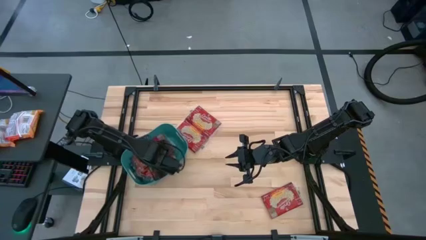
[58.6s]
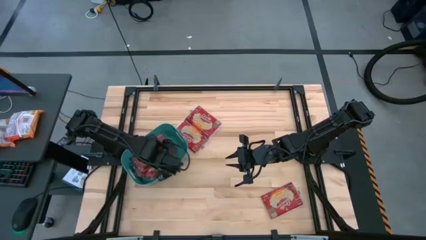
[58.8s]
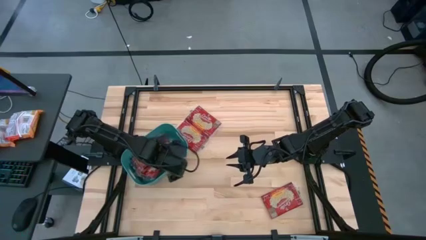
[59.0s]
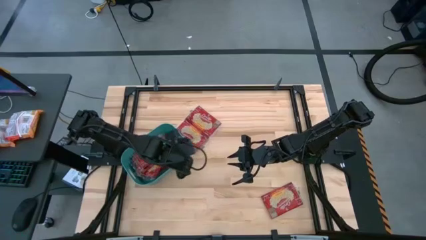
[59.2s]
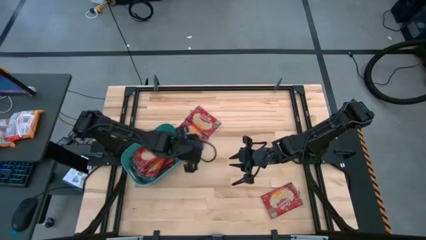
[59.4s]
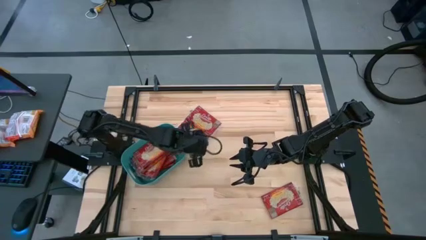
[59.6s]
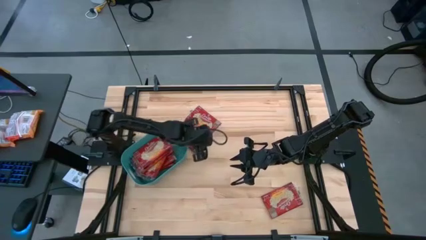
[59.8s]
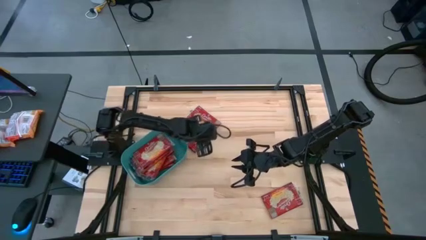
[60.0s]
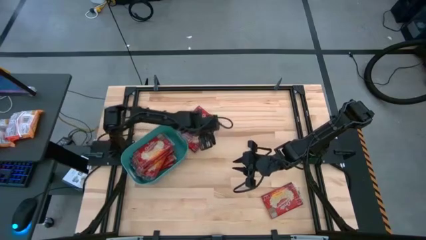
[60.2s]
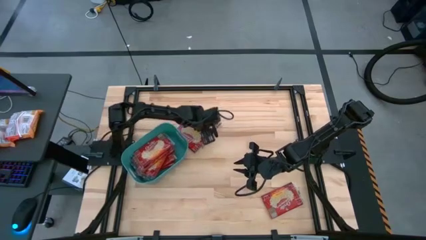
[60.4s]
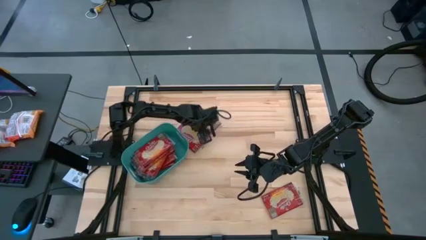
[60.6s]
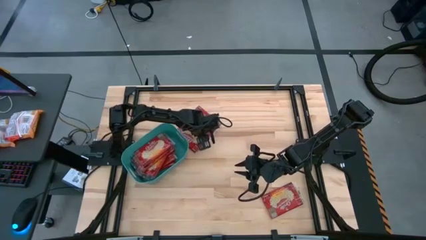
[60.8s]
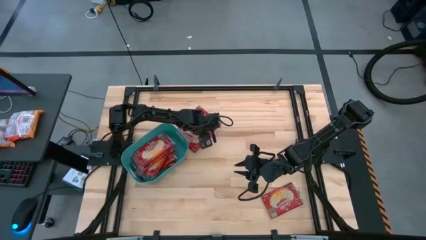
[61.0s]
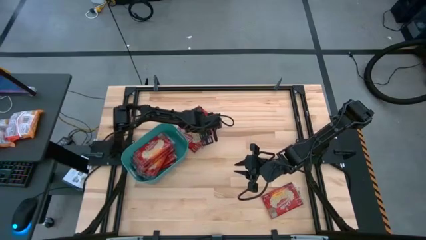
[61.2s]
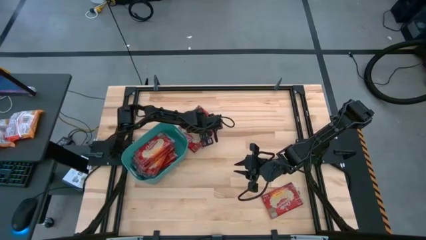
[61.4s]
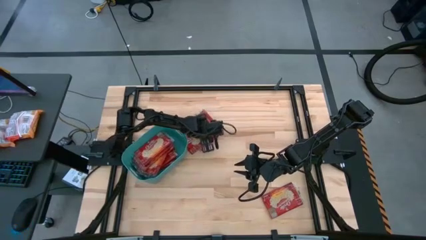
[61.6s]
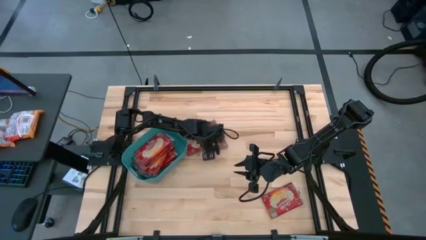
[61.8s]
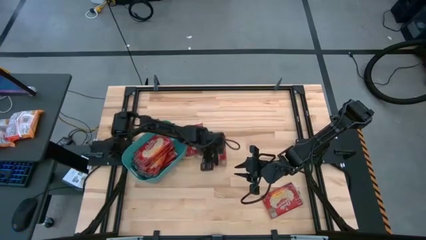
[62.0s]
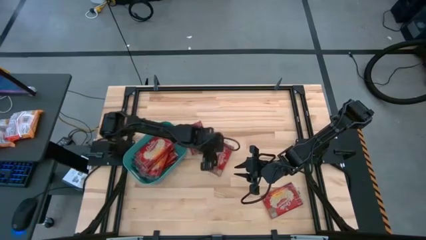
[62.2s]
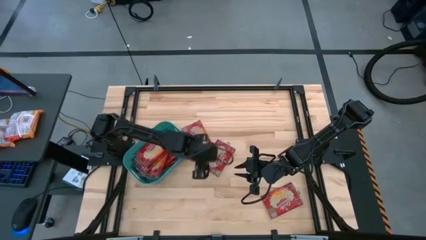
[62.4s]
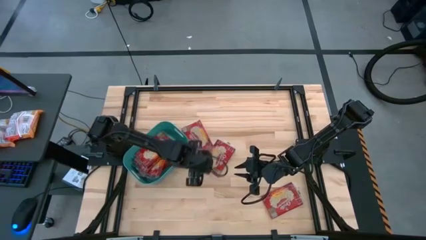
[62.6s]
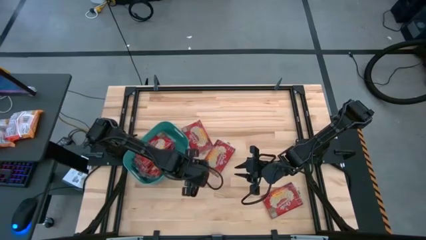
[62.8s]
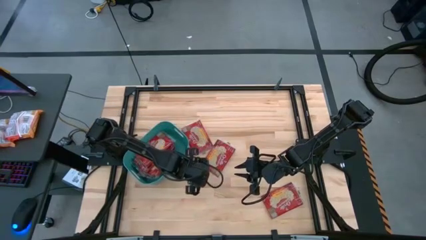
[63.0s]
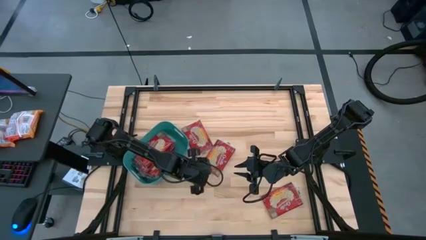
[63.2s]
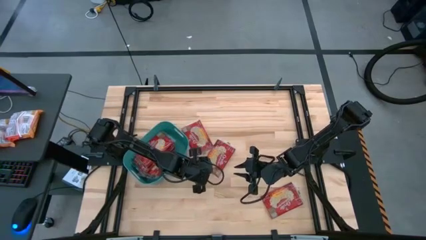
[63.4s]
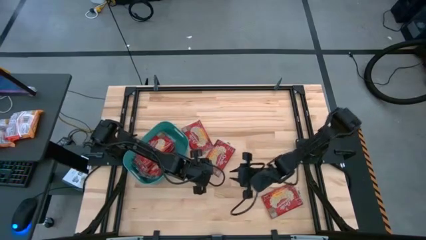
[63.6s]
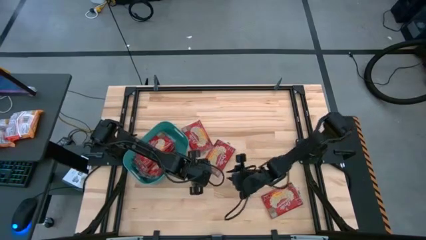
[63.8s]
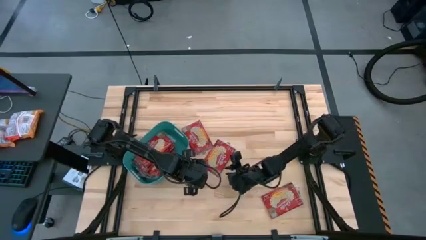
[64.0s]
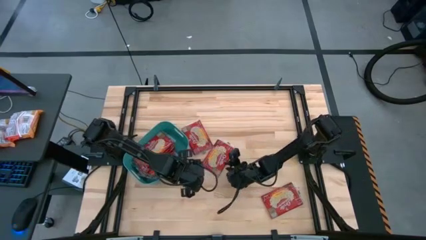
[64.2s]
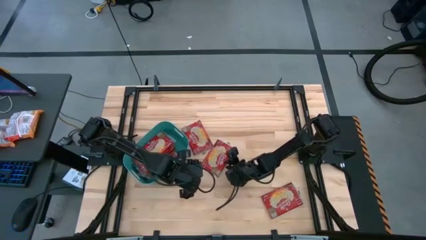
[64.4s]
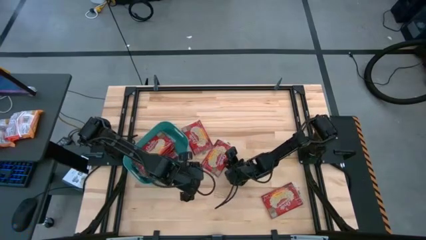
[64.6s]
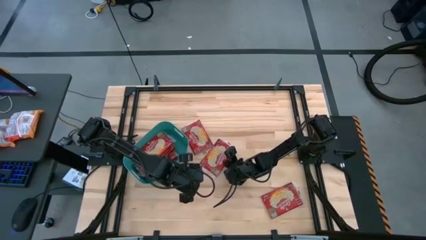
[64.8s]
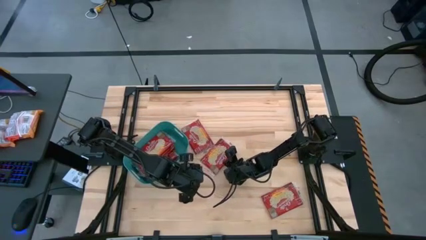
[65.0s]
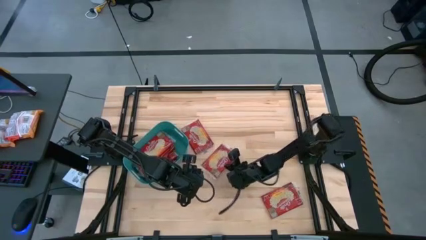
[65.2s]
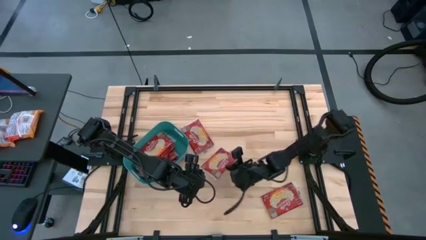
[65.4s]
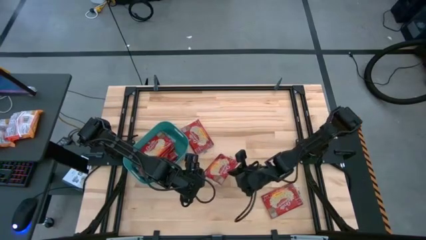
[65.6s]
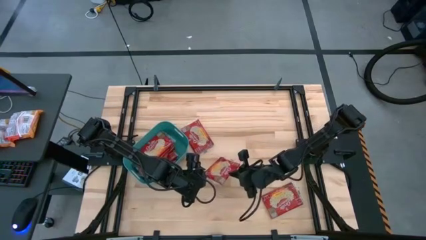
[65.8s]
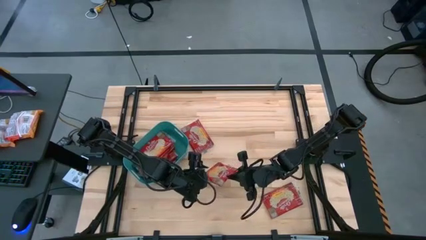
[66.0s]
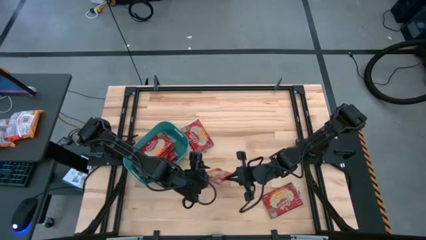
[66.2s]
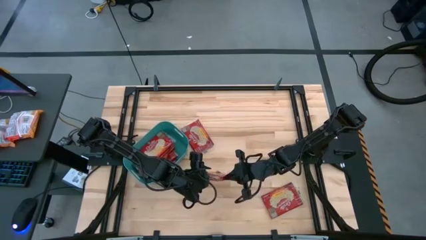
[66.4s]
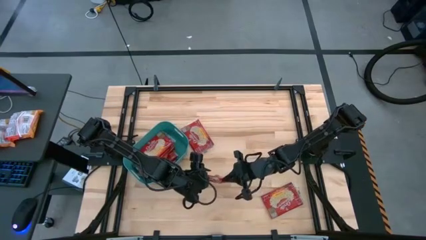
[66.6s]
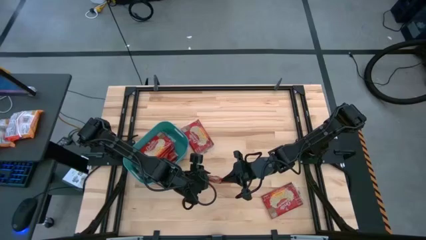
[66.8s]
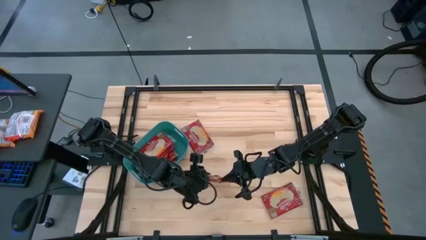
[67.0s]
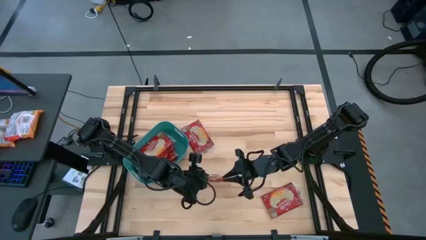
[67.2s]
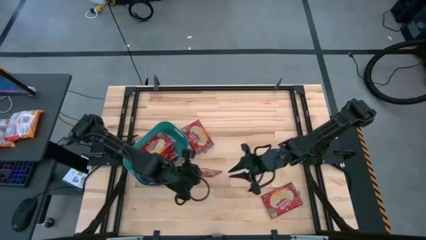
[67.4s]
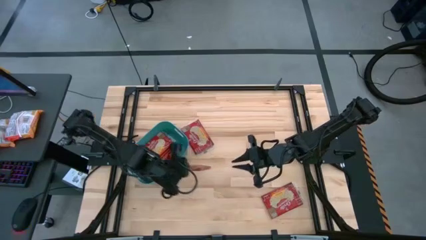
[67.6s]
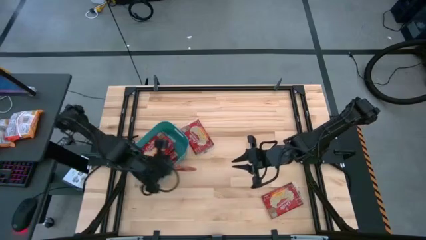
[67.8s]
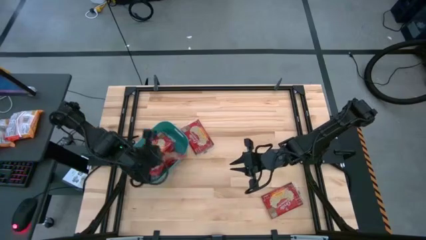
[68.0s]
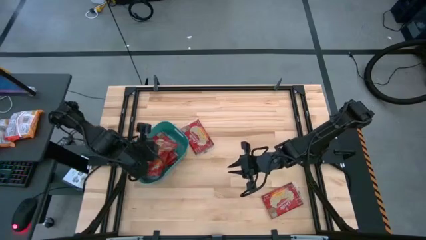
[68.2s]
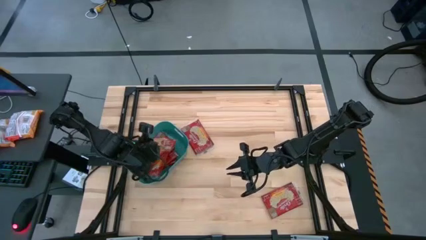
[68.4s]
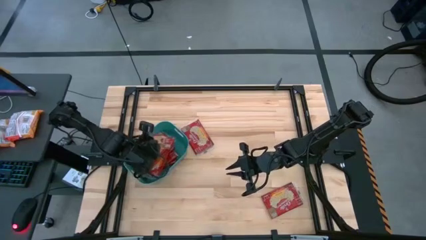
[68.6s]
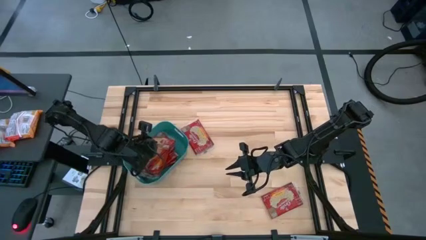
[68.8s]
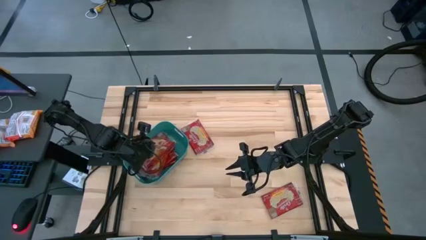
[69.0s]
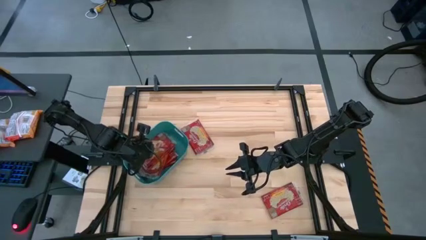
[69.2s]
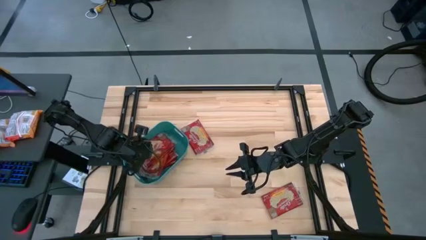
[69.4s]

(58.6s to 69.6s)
Task: Sort popcorn bags into baskets
Put the red popcorn bag into the green bin
